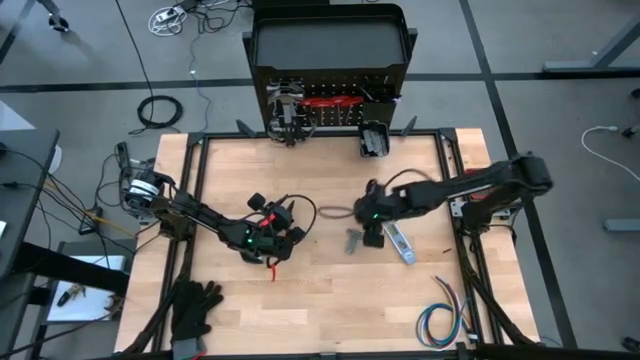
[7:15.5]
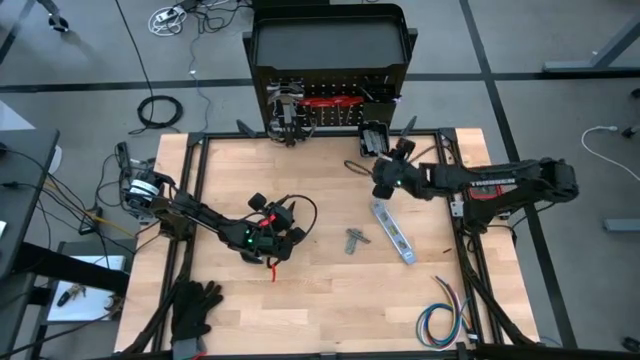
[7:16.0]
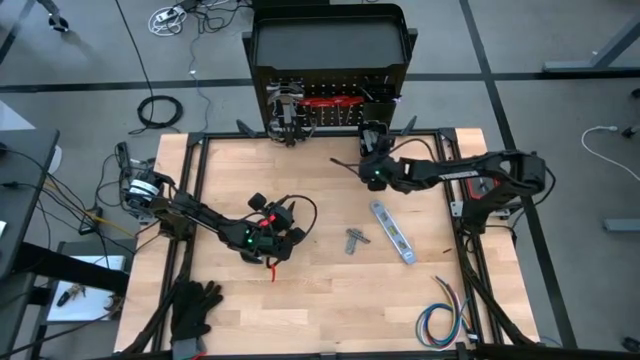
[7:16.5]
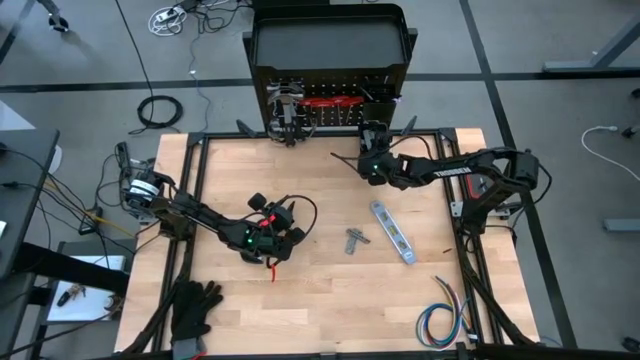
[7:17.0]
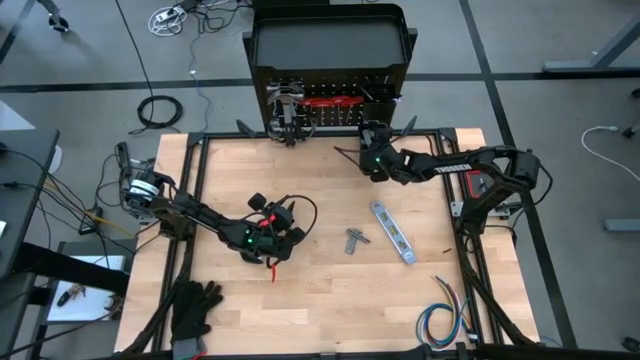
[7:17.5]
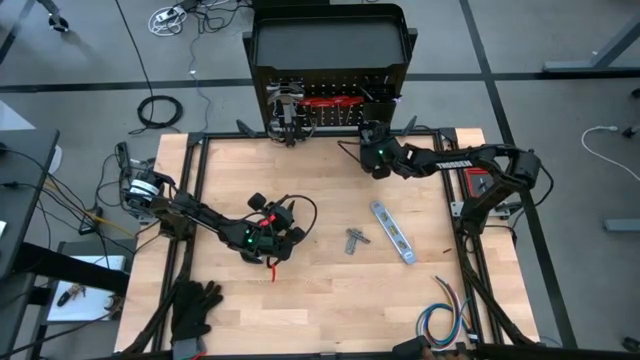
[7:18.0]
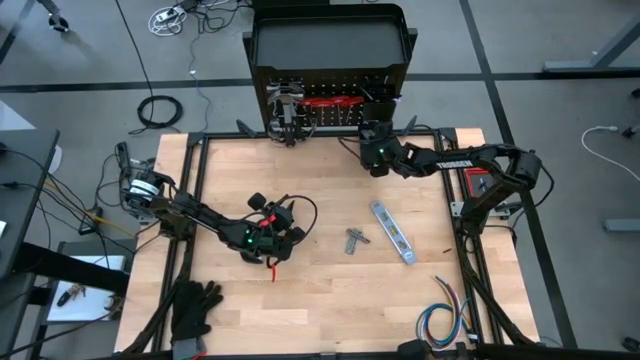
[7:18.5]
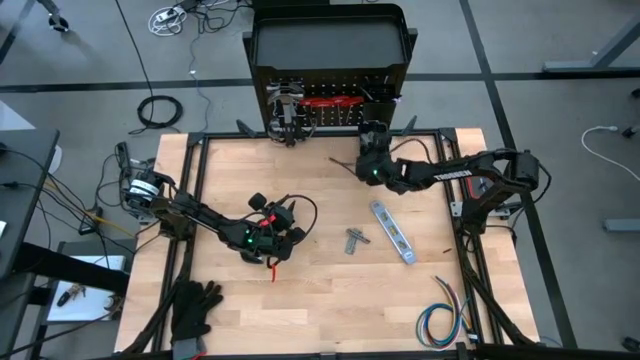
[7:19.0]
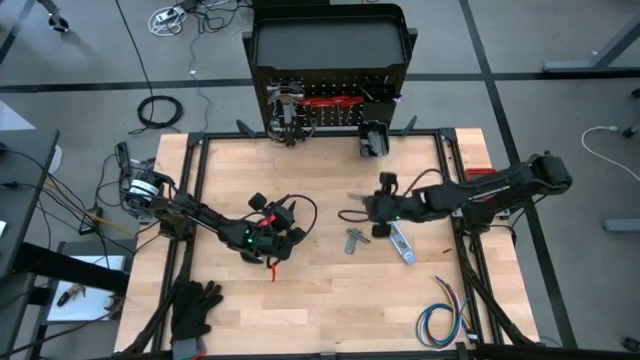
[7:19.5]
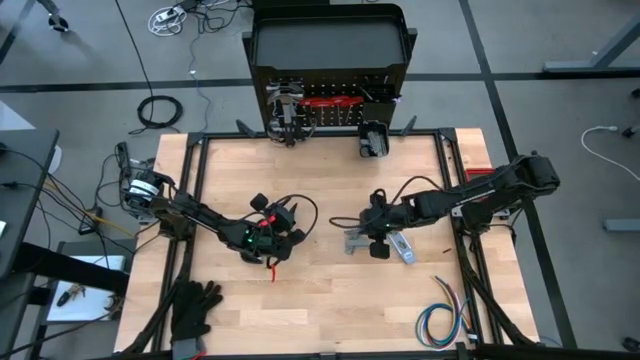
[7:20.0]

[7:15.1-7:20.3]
Task: Hang tools onto peg board
Put the screwdriver bits on the table

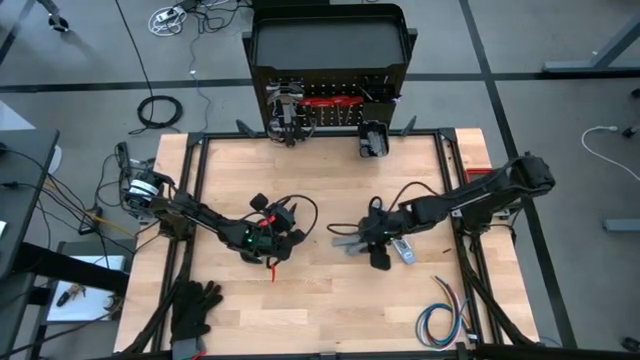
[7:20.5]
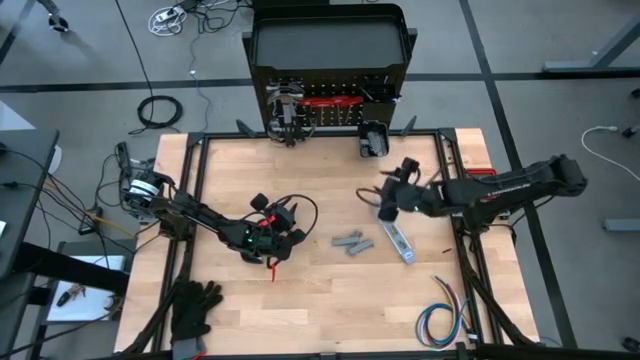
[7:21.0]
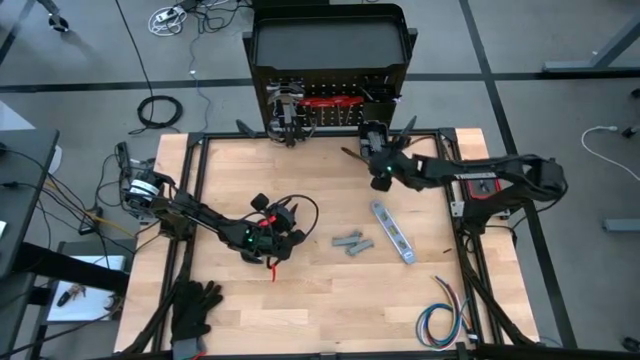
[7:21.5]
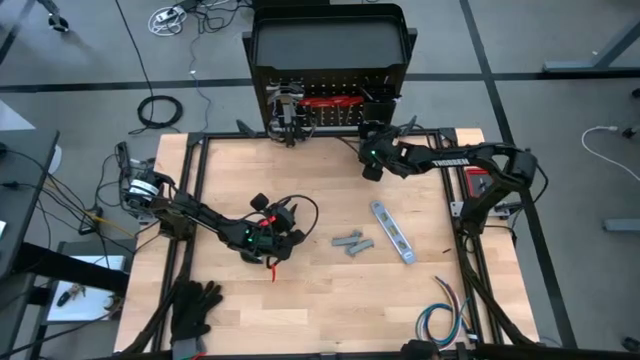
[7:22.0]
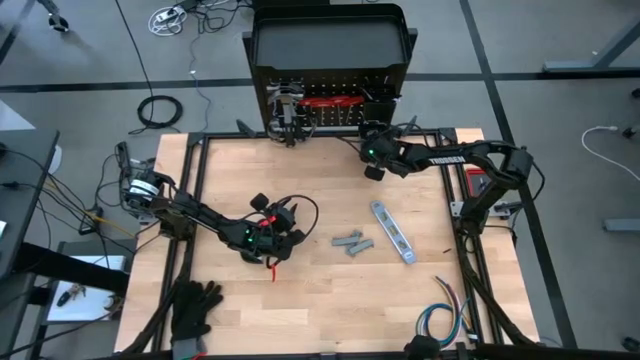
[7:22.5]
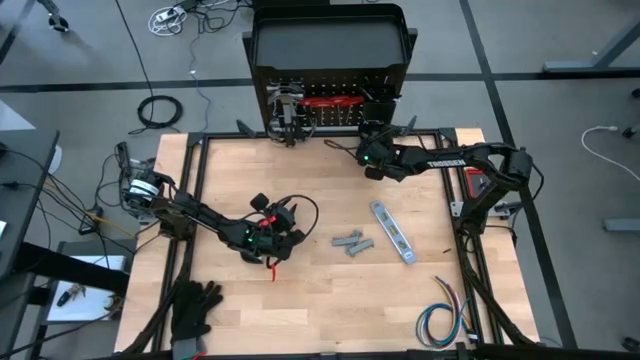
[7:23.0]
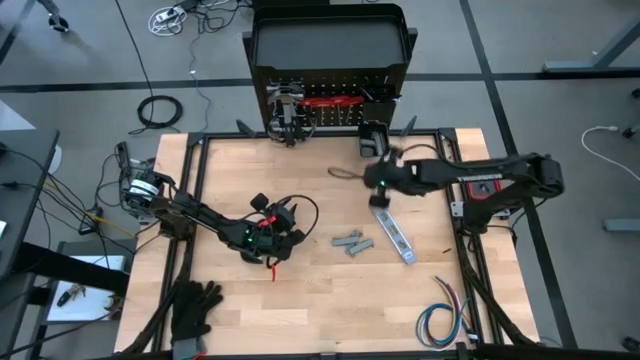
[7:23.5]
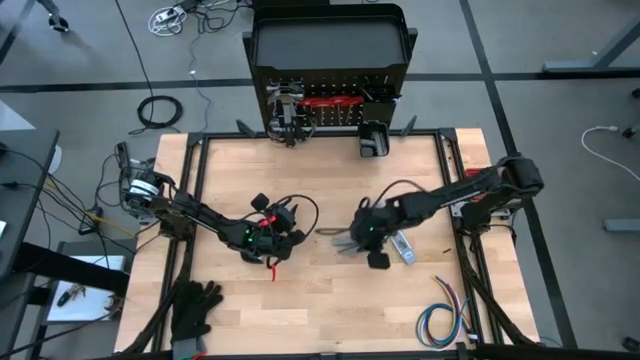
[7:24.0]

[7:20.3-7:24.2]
Put the screwdriver bits on the table

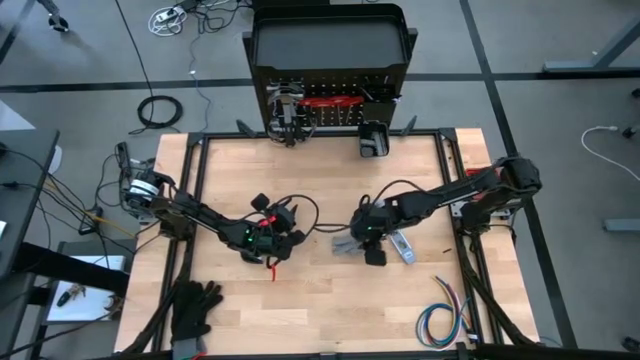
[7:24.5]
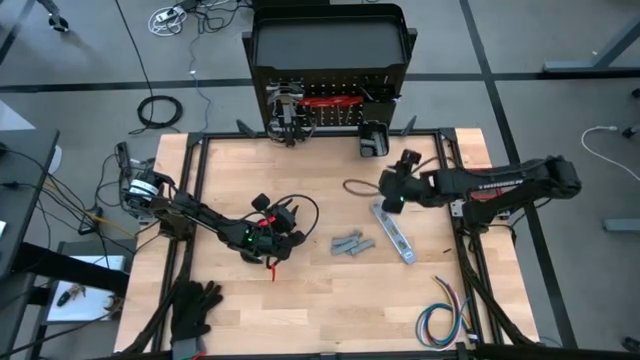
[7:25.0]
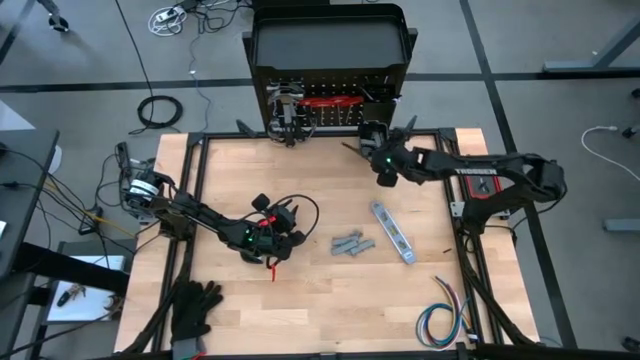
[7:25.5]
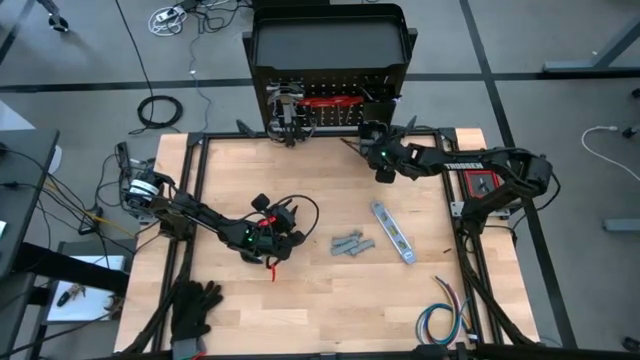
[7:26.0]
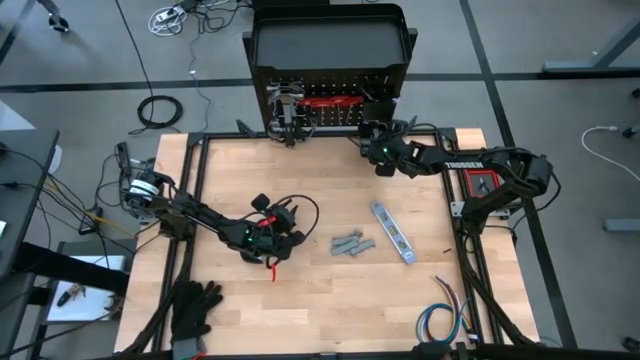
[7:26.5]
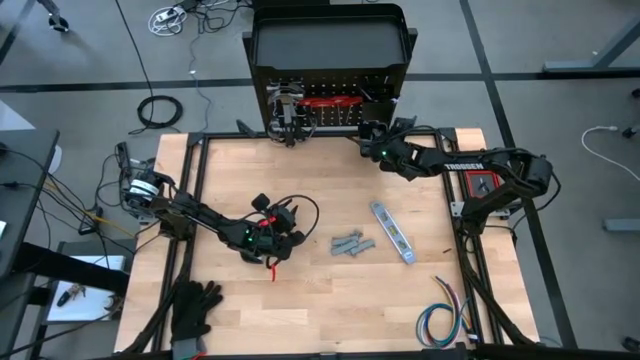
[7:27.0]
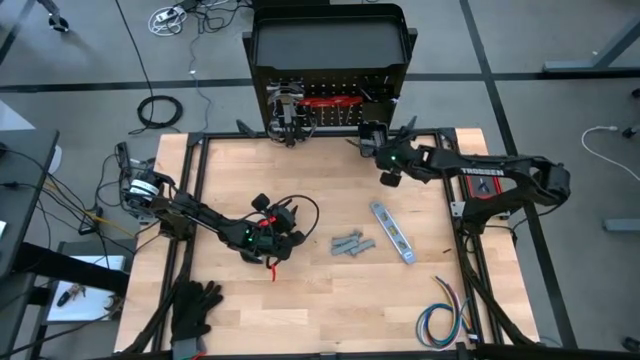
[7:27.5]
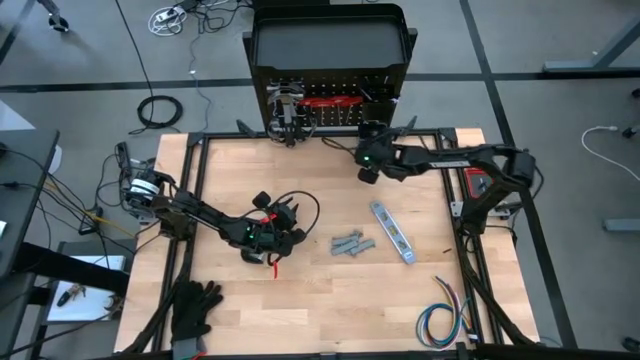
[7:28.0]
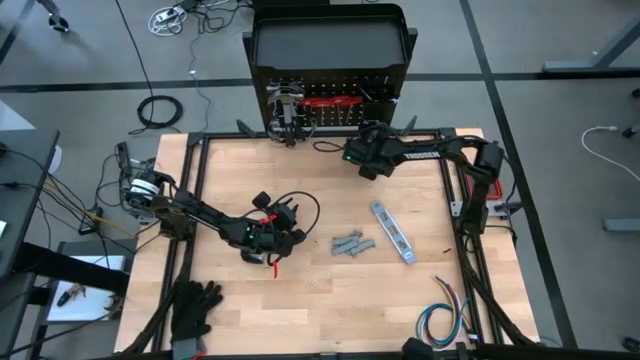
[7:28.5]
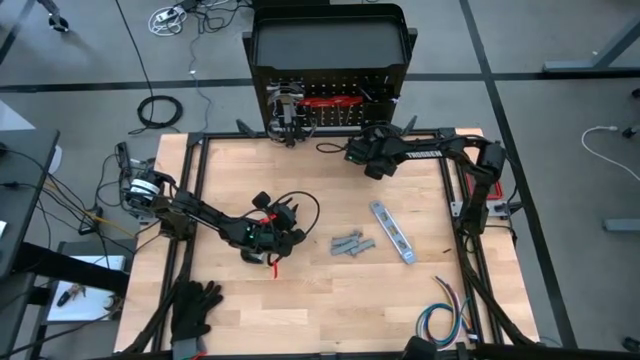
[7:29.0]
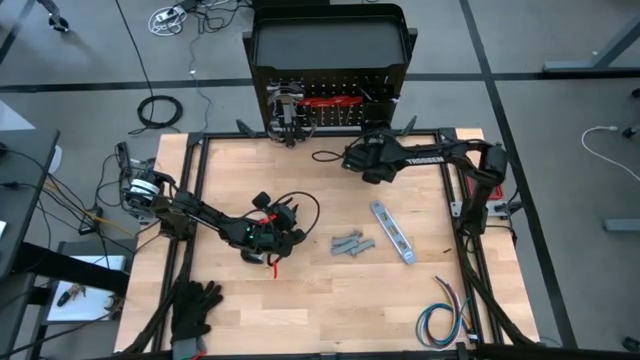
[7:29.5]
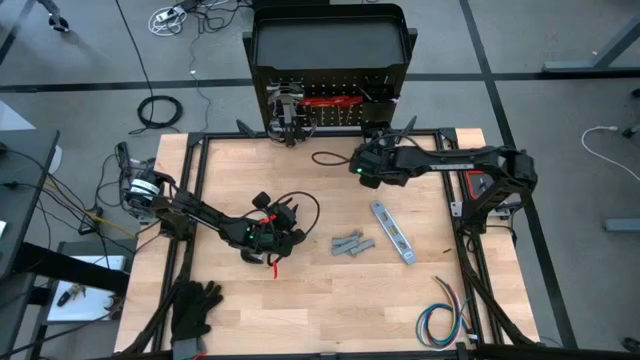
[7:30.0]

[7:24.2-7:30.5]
Put the screwdriver bits on the table

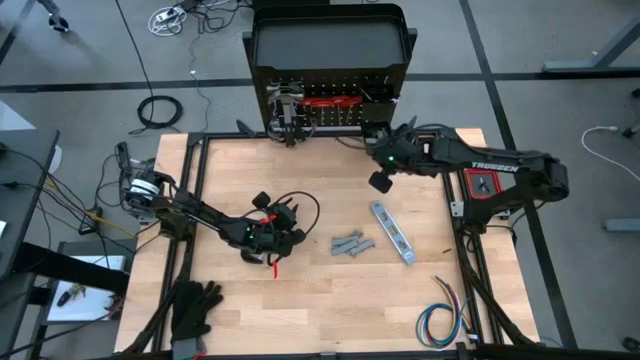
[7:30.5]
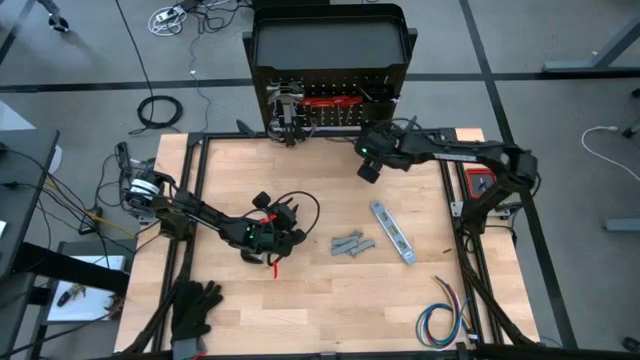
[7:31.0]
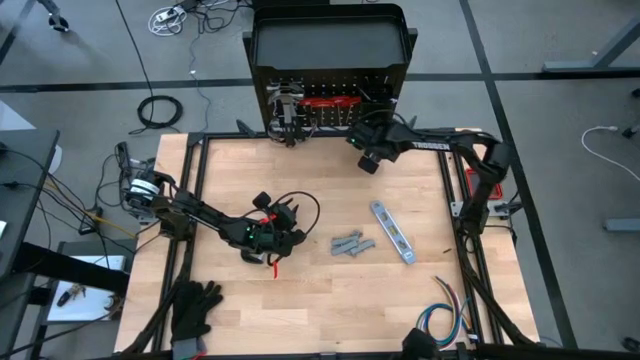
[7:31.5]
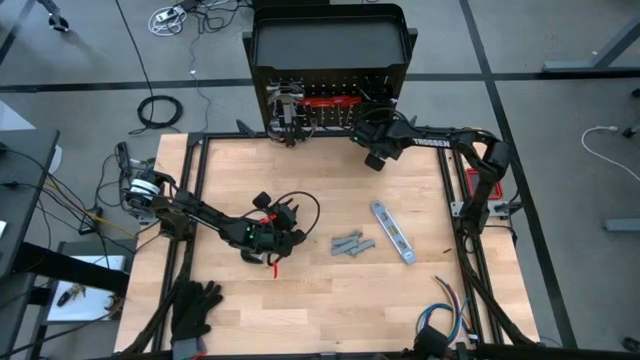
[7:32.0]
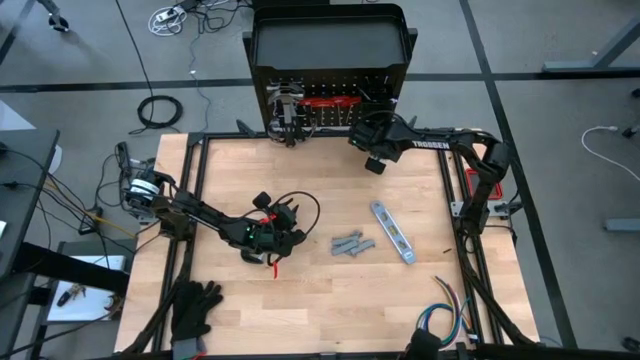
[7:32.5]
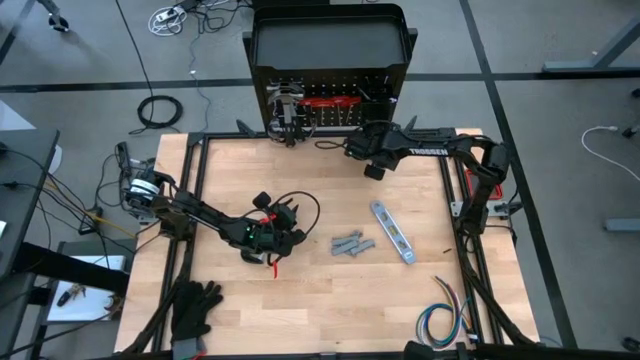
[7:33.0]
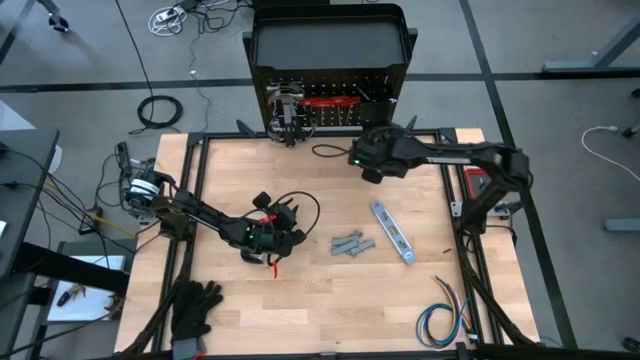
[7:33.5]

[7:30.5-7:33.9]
Put the screwdriver bits on the table

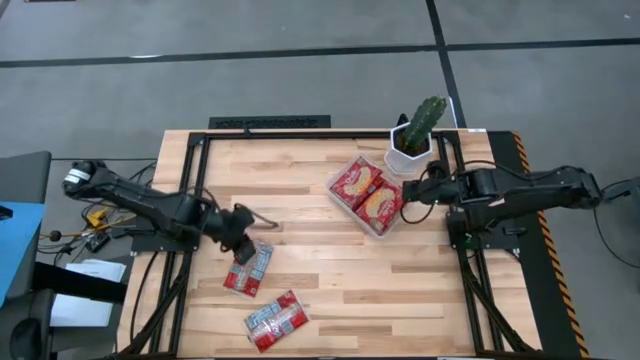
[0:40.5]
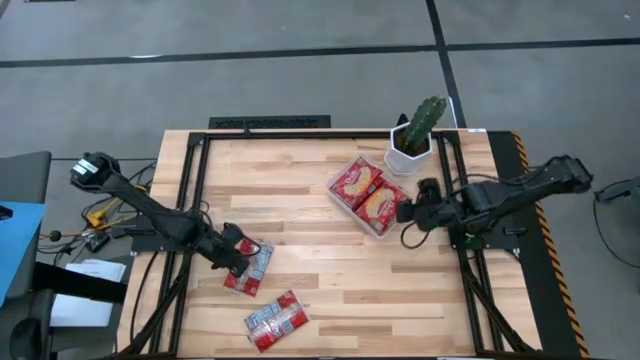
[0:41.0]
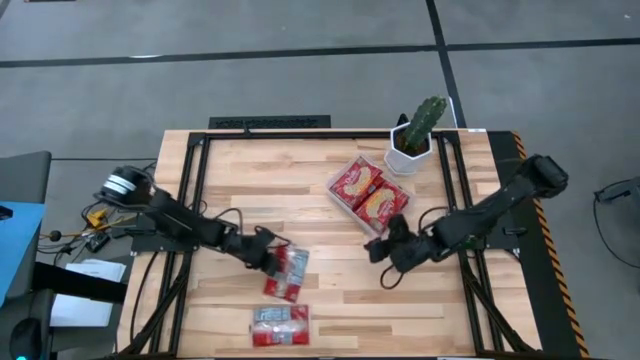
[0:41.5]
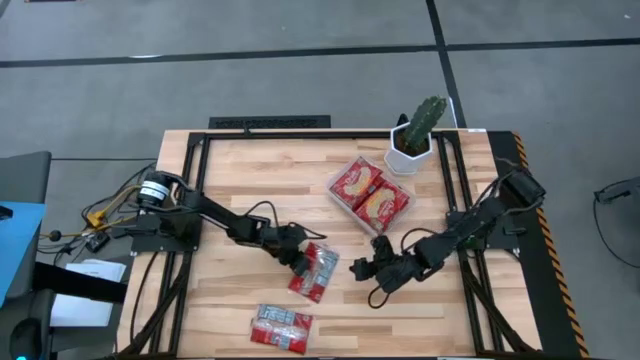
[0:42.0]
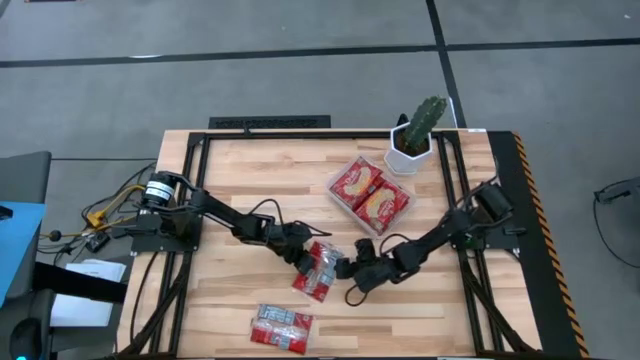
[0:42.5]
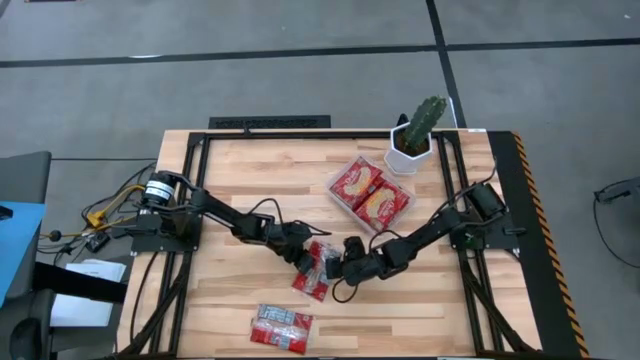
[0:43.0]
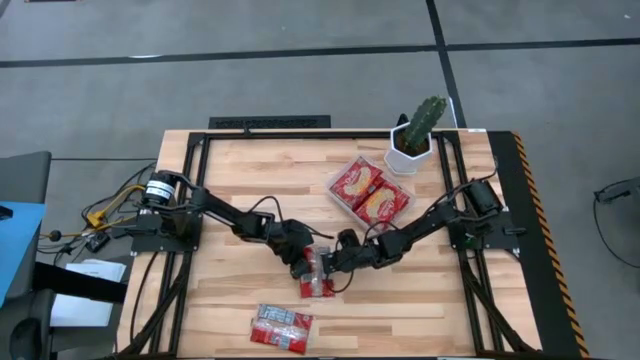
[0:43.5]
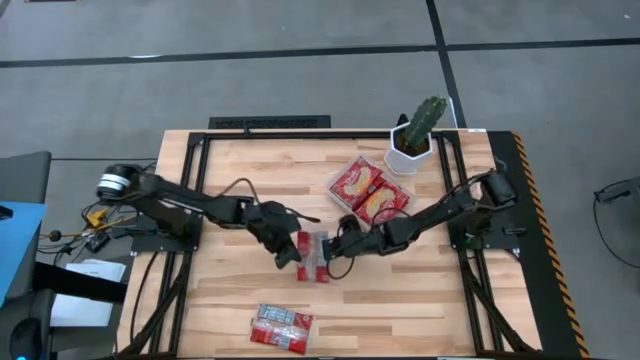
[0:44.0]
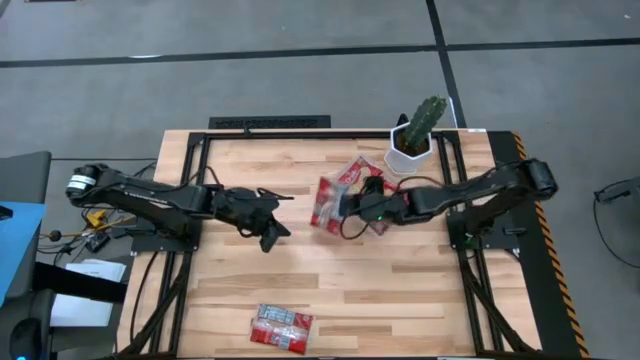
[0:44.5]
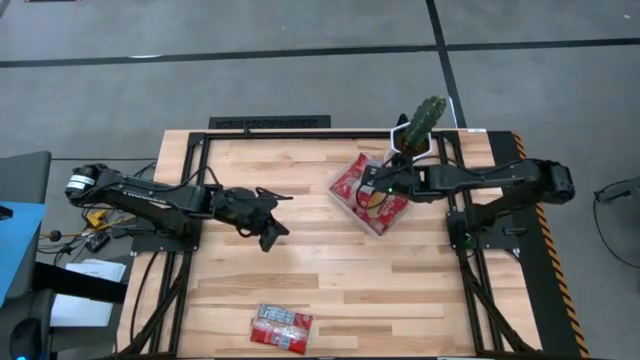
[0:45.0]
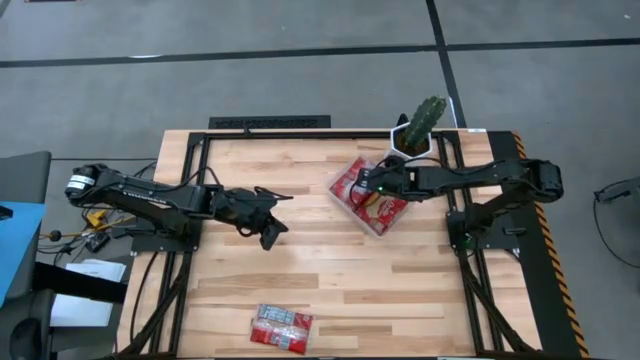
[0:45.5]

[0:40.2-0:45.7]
Task: Sort popcorn bags into baskets
Put the red popcorn pack into the transparent bin
